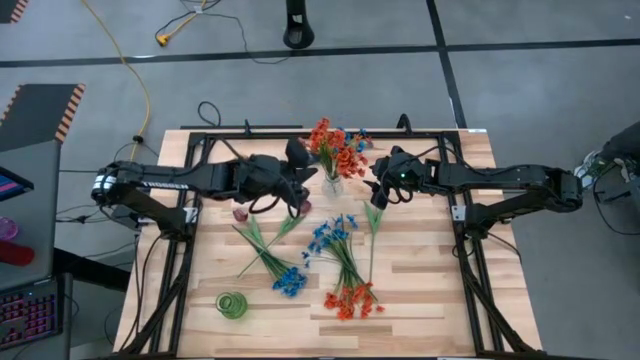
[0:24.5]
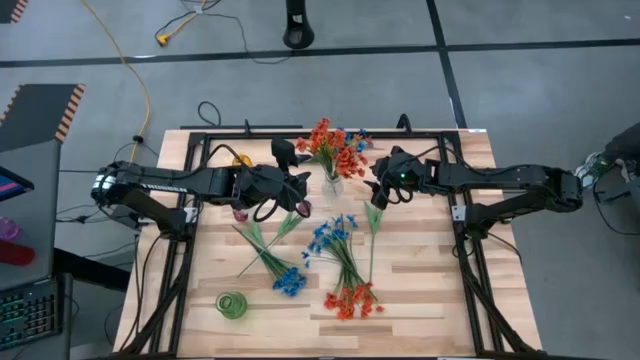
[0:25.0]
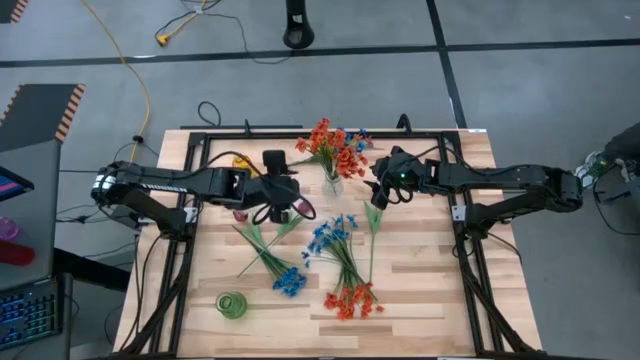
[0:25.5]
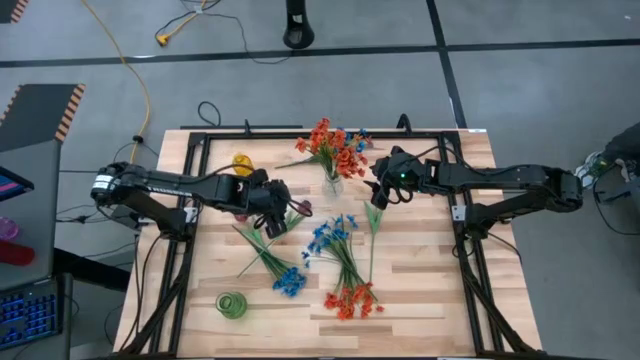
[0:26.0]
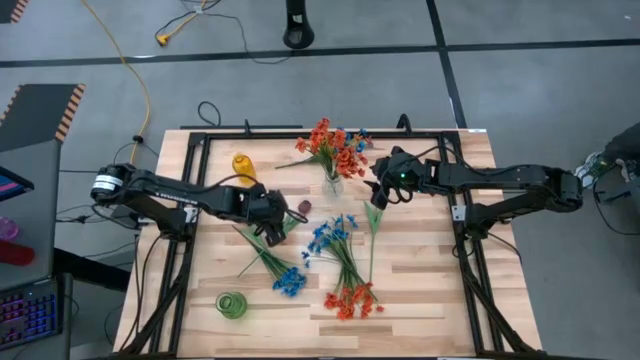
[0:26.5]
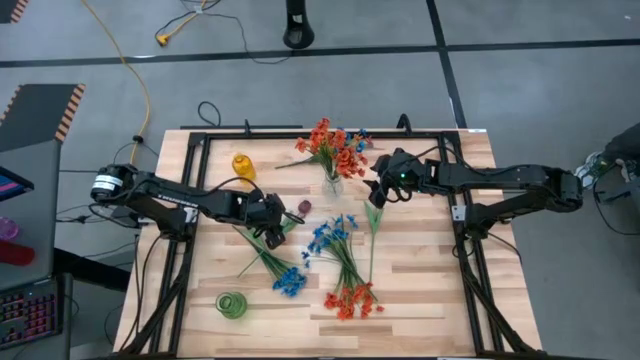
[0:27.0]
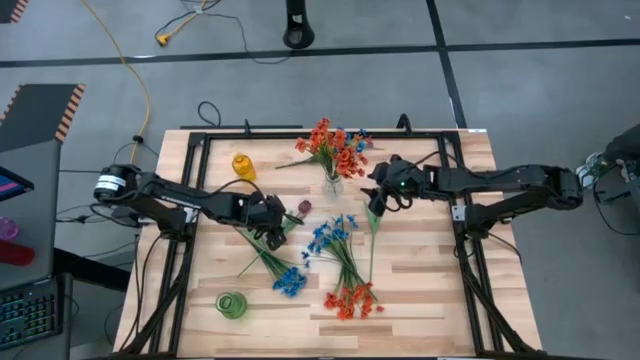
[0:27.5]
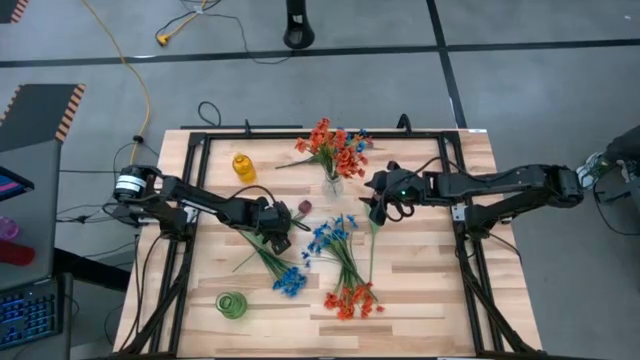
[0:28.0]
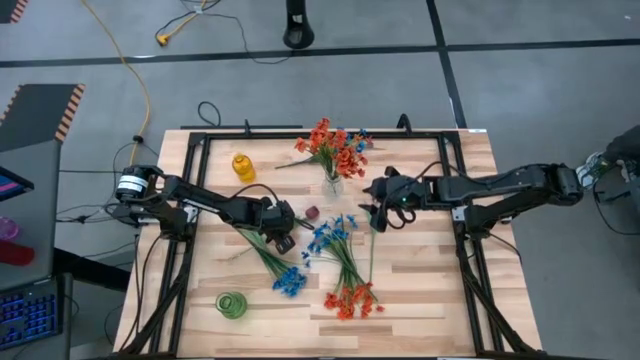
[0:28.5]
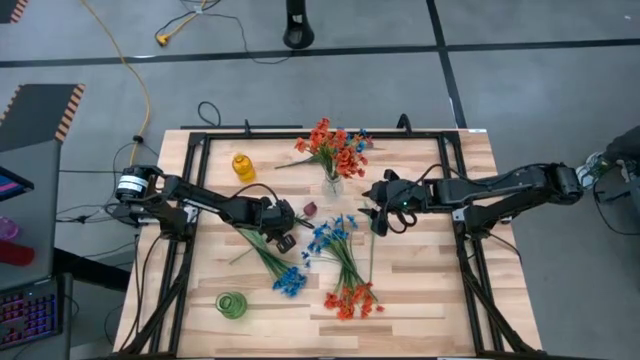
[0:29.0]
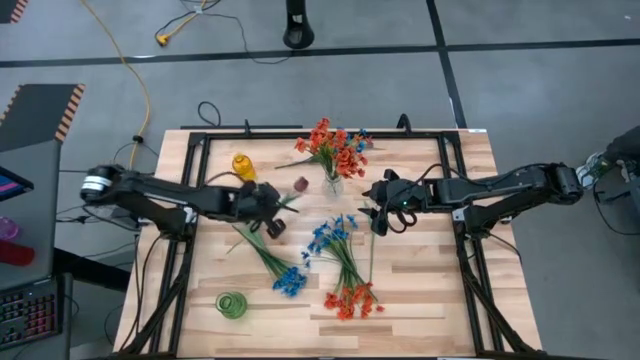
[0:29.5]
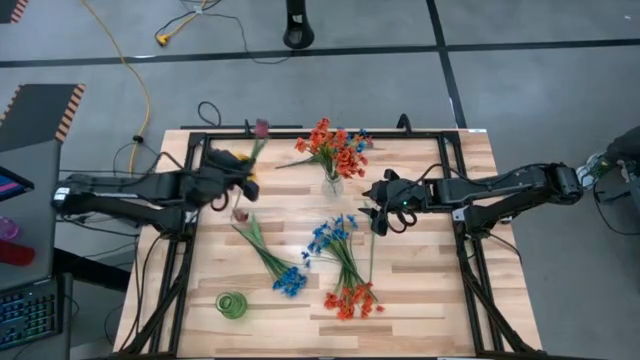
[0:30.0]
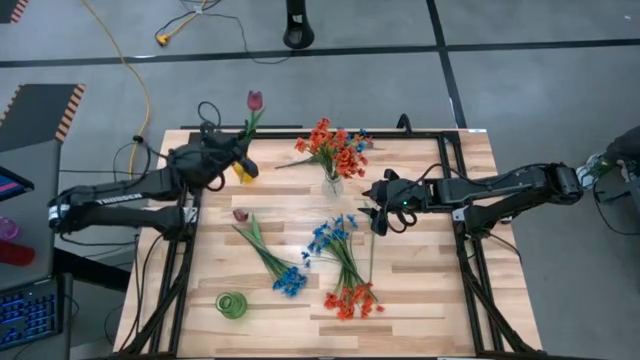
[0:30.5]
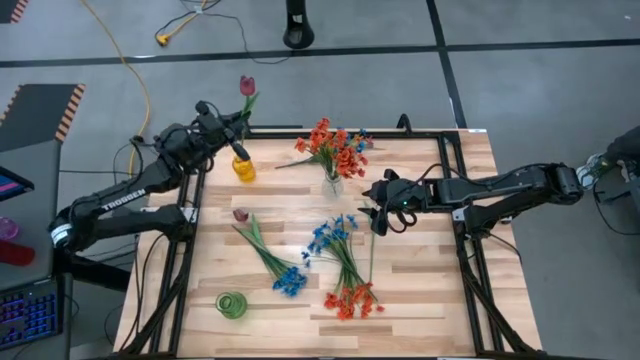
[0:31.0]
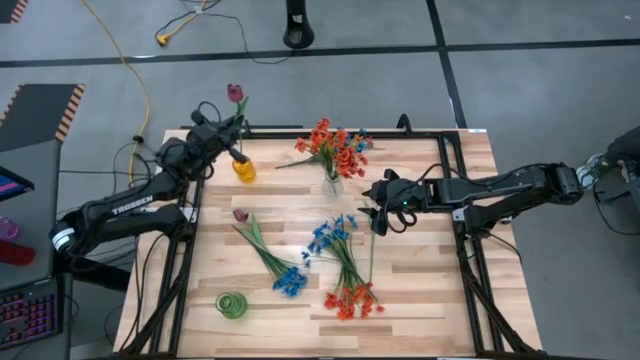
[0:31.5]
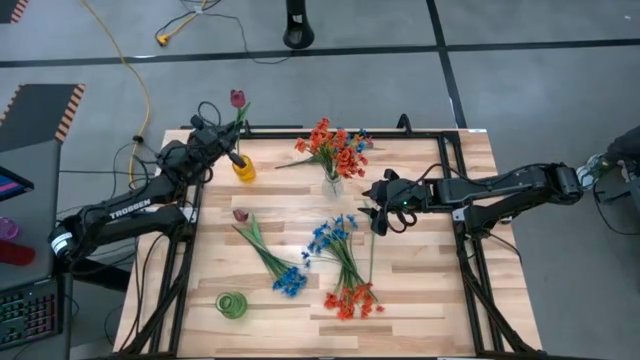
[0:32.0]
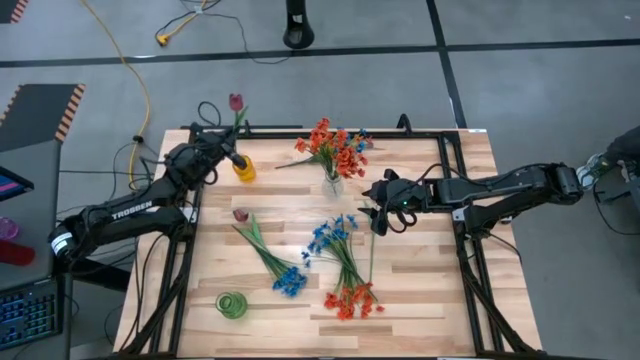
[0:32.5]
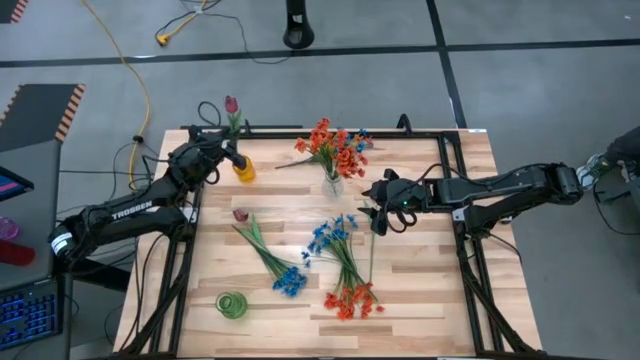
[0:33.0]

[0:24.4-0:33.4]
Task: Sort flowers into vase by color
Put the bottom left red flower into the yellow vase

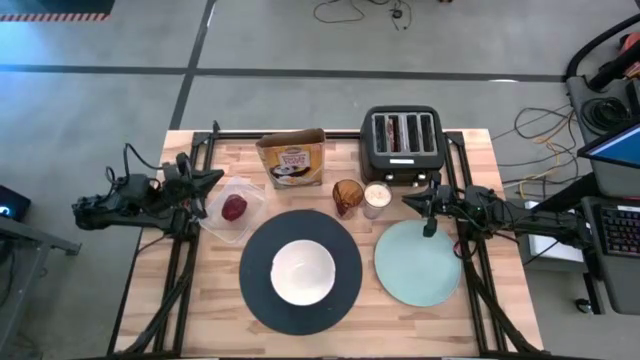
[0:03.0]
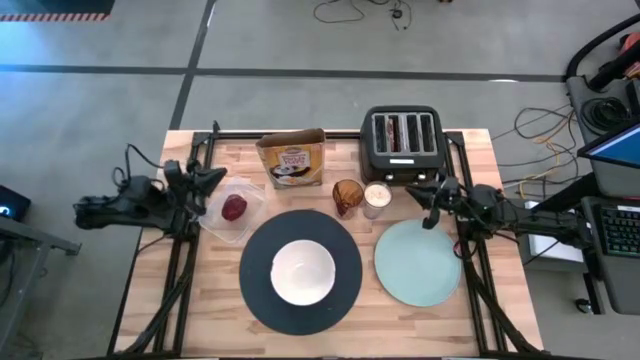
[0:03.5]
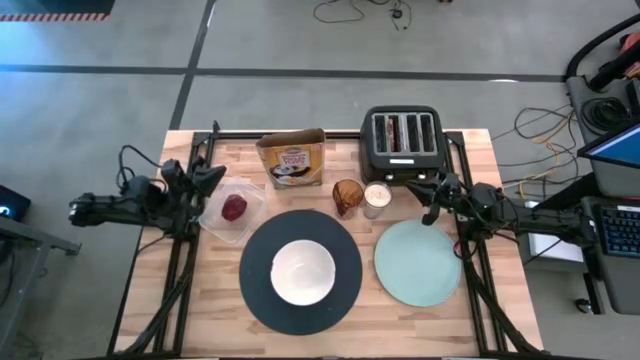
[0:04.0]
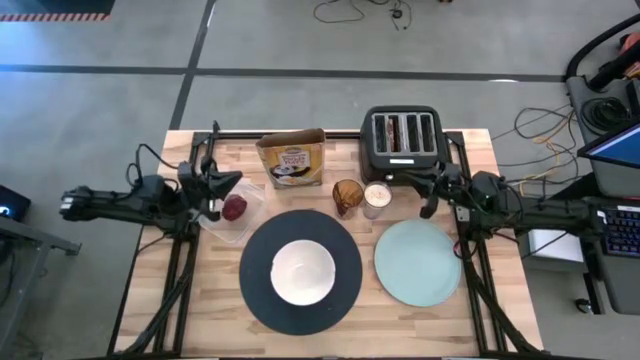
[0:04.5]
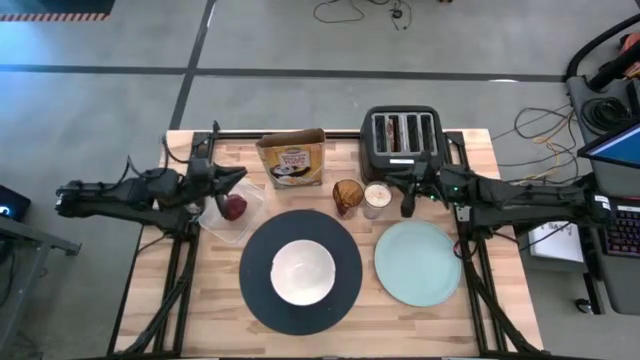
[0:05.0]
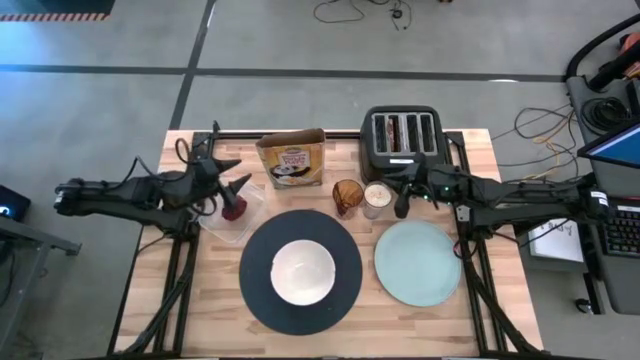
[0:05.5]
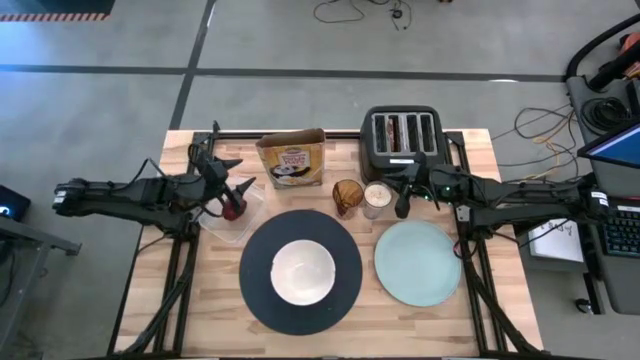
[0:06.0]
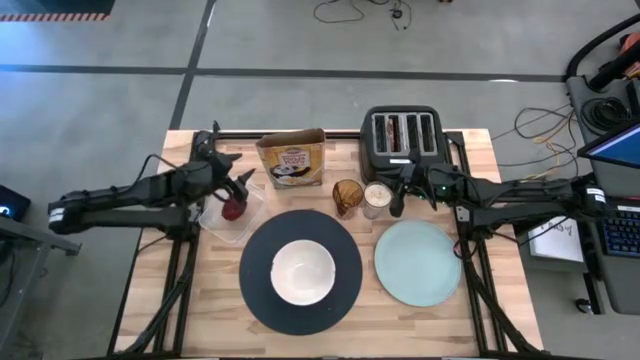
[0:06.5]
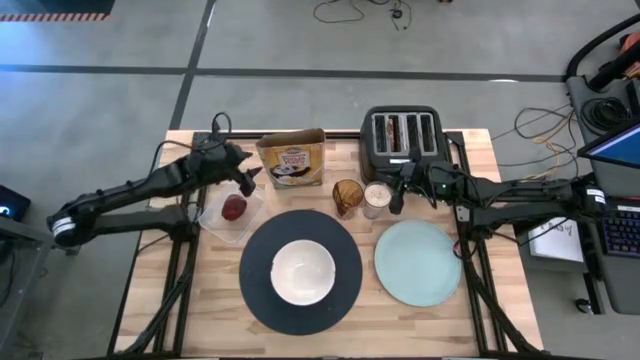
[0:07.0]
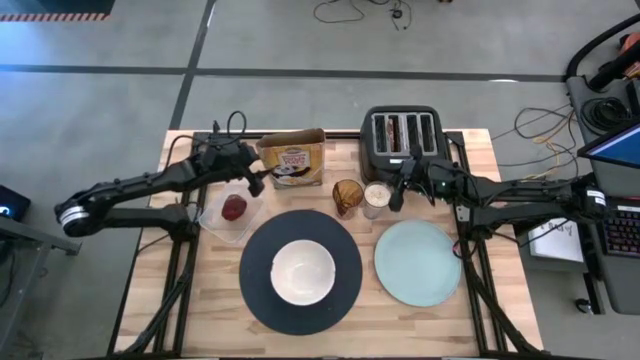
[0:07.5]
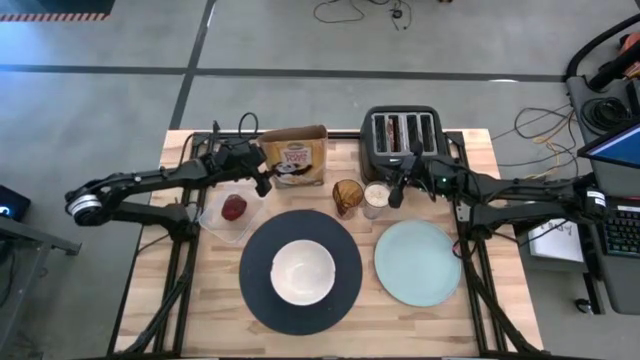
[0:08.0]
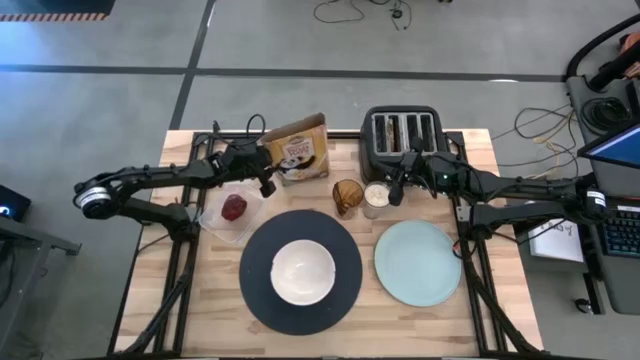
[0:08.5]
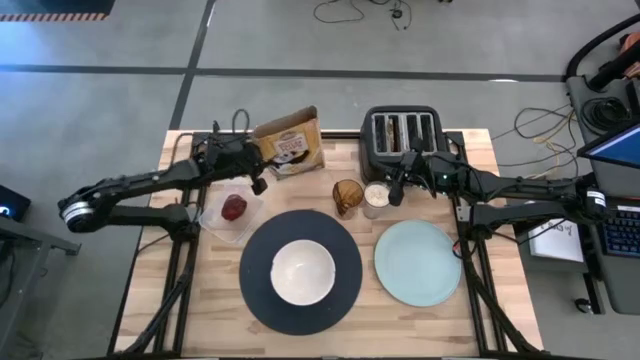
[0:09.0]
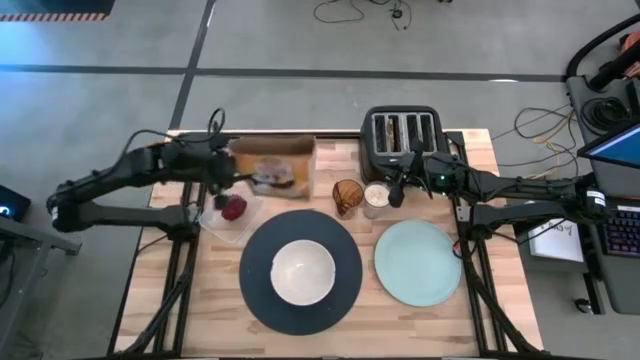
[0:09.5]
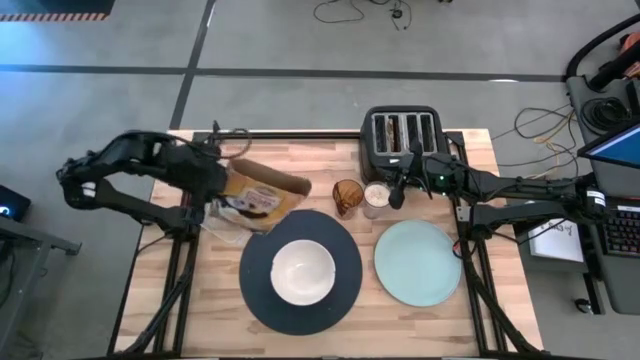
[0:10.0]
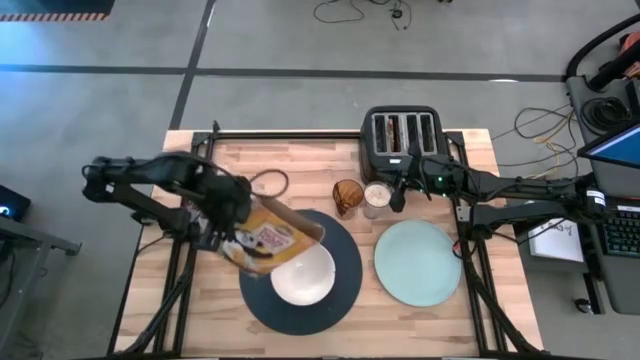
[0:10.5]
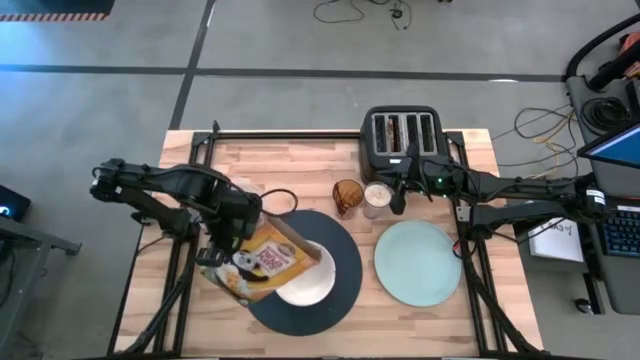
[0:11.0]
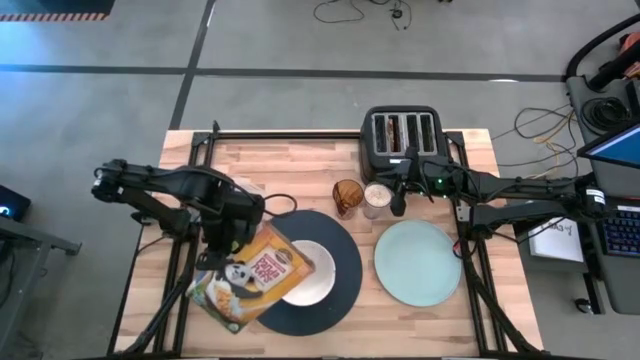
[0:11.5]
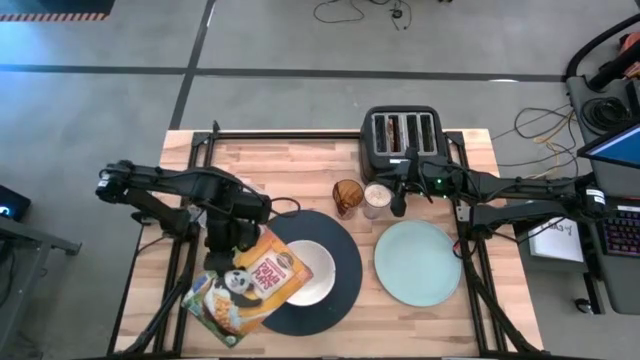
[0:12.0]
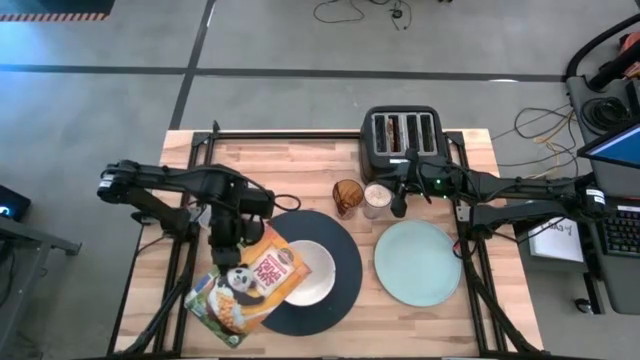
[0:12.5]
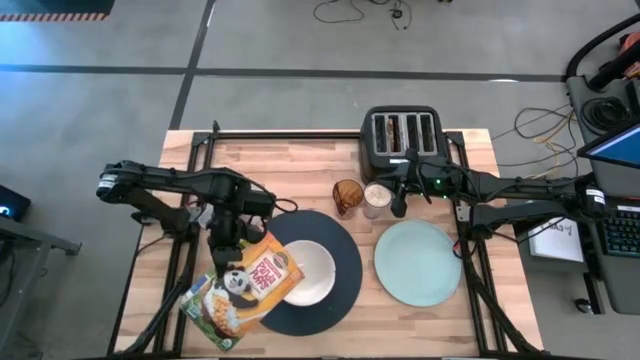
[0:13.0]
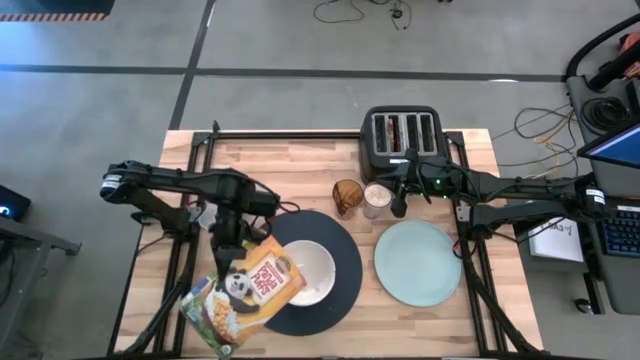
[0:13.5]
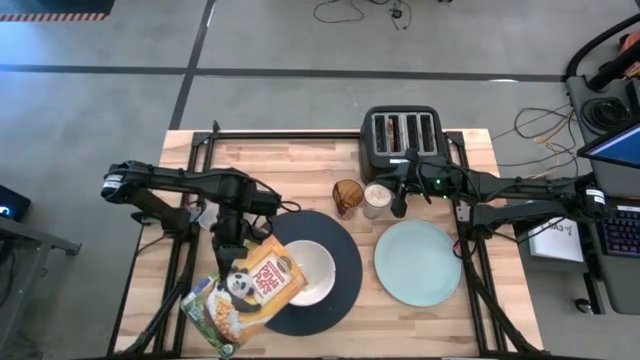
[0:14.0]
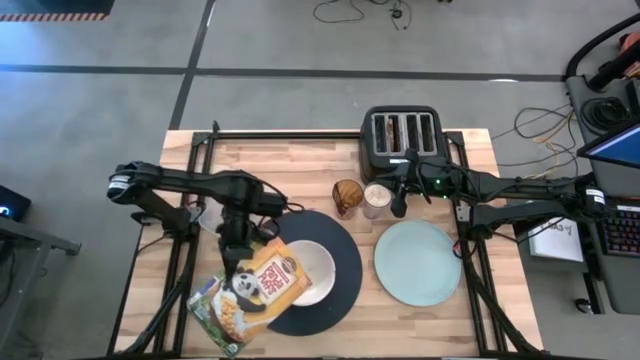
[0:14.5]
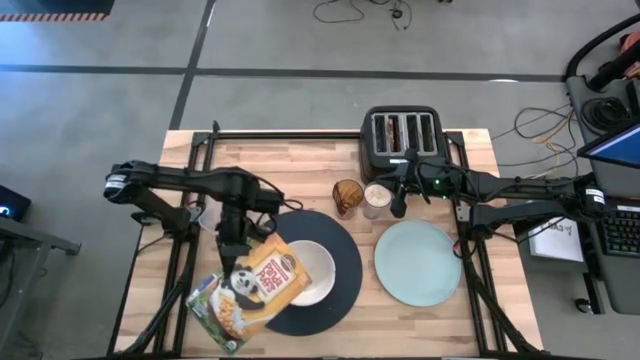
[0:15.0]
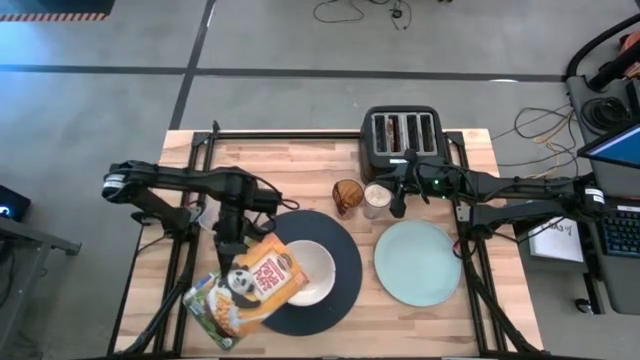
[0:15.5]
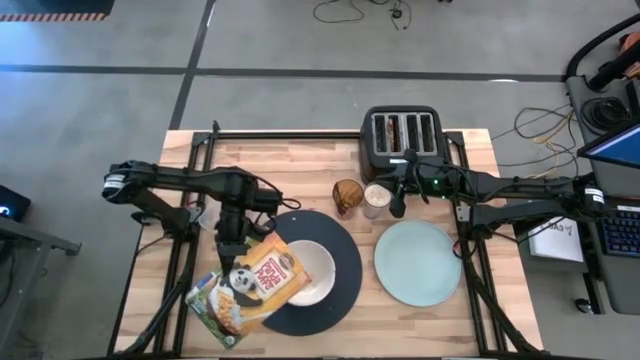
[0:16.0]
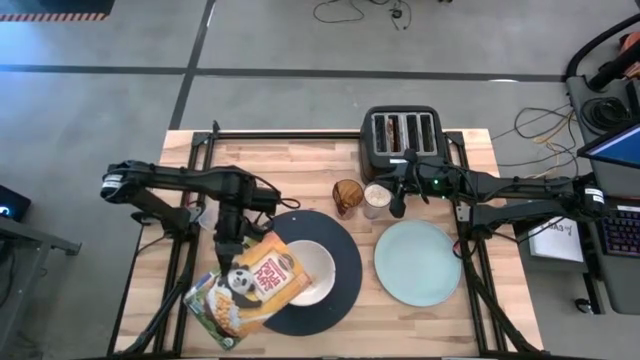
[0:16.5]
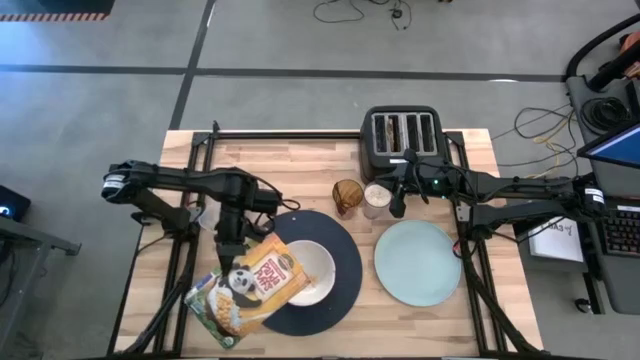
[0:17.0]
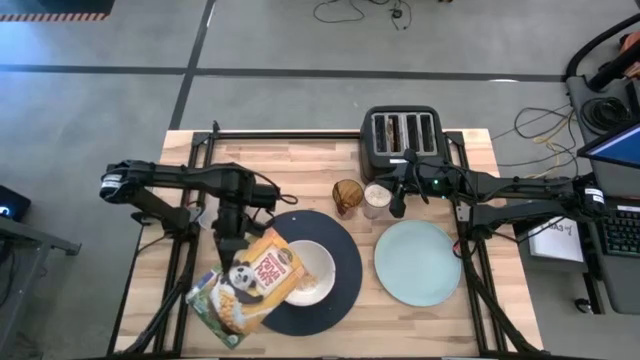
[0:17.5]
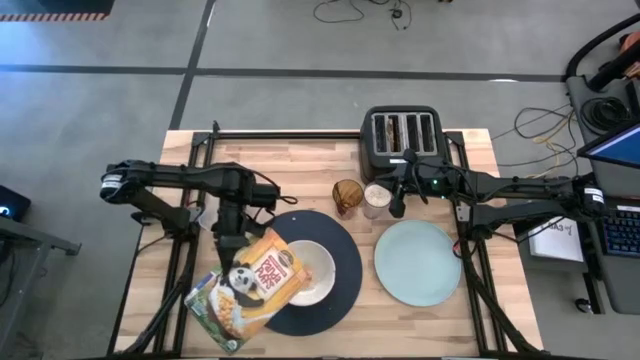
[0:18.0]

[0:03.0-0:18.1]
Task: Arrange a breakfast setting
Pour the cereal from the yellow box into the white bowl
